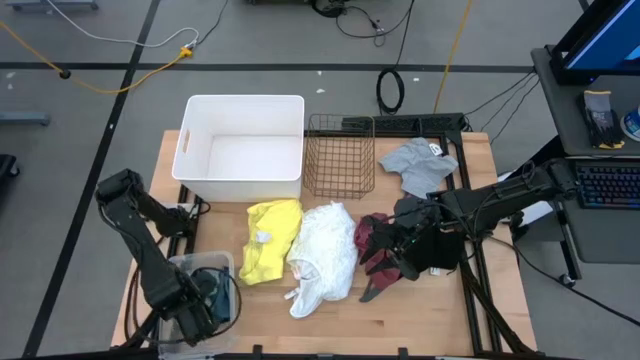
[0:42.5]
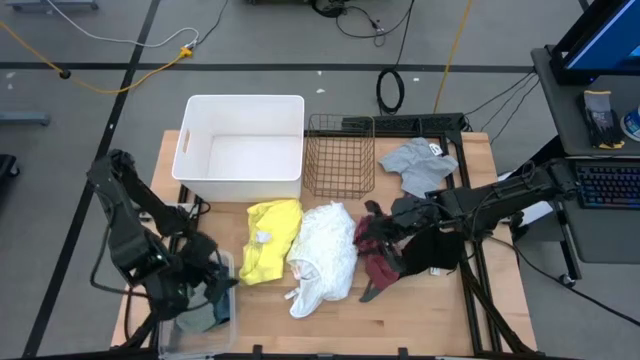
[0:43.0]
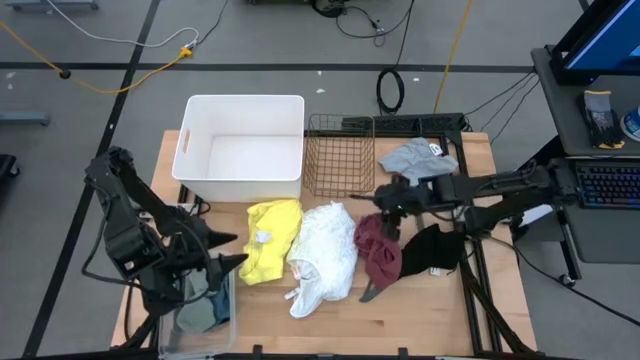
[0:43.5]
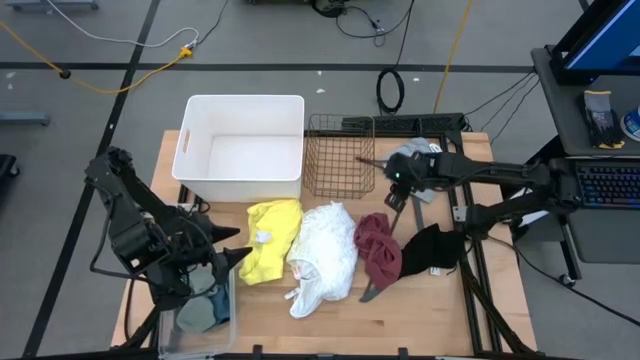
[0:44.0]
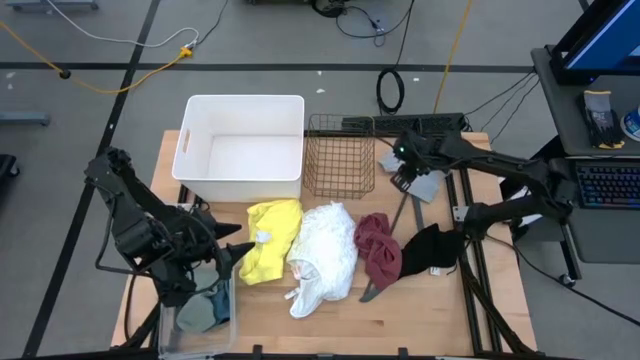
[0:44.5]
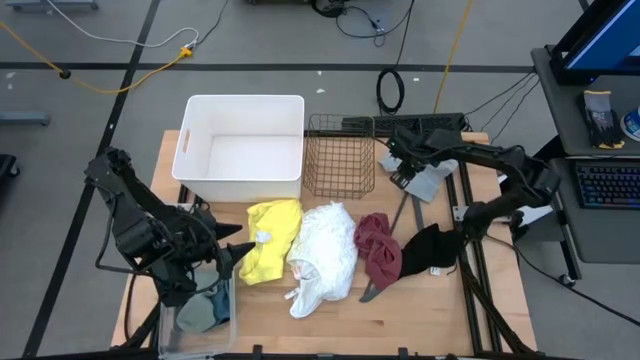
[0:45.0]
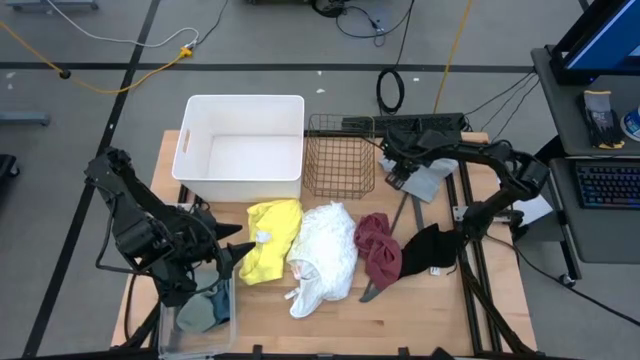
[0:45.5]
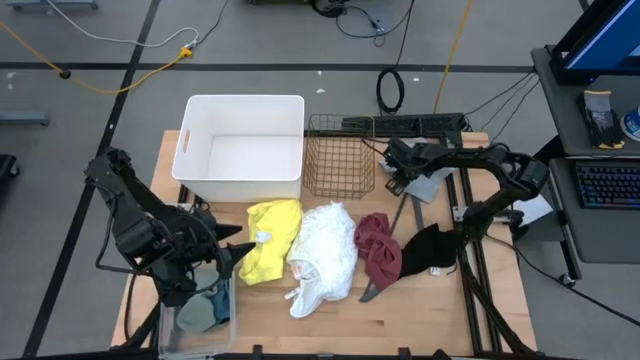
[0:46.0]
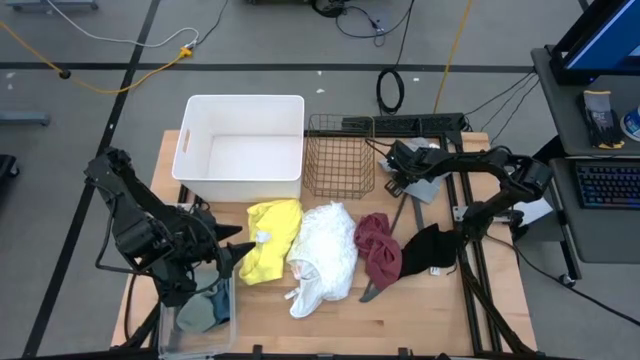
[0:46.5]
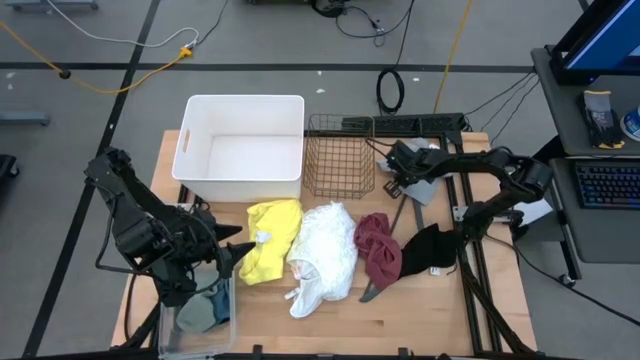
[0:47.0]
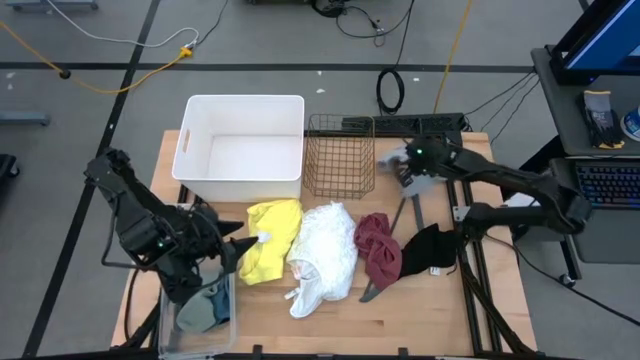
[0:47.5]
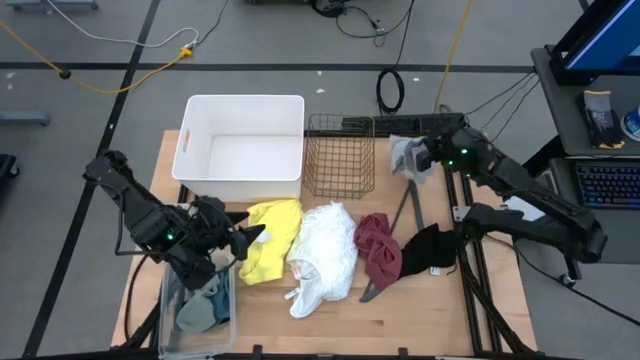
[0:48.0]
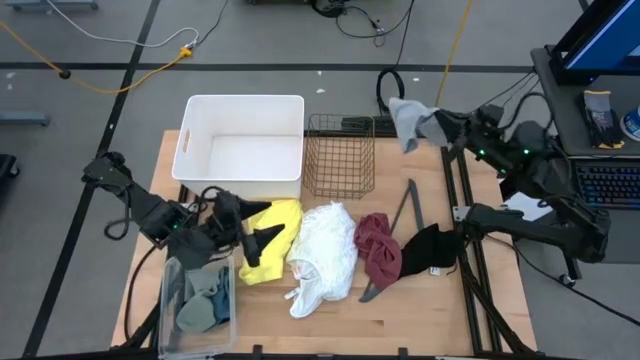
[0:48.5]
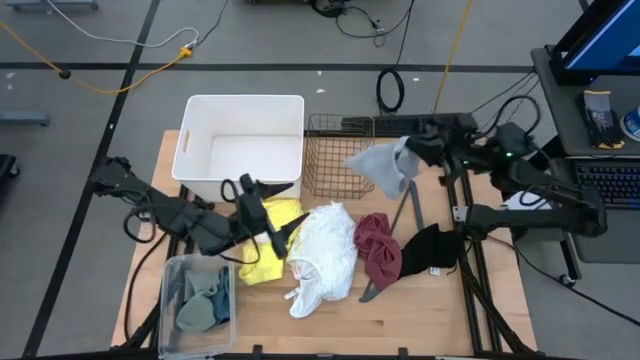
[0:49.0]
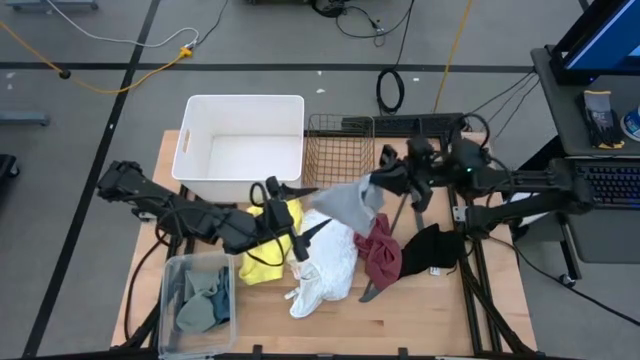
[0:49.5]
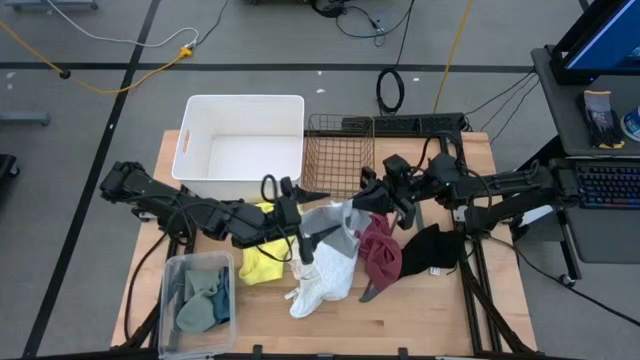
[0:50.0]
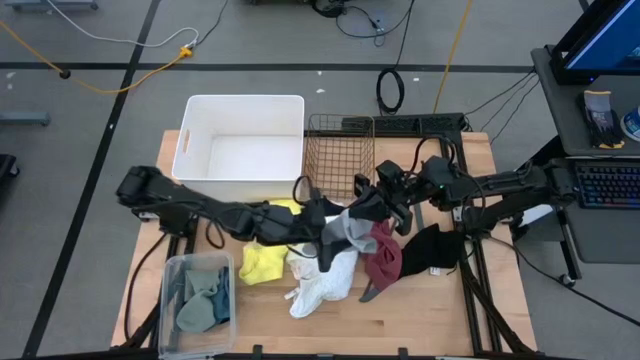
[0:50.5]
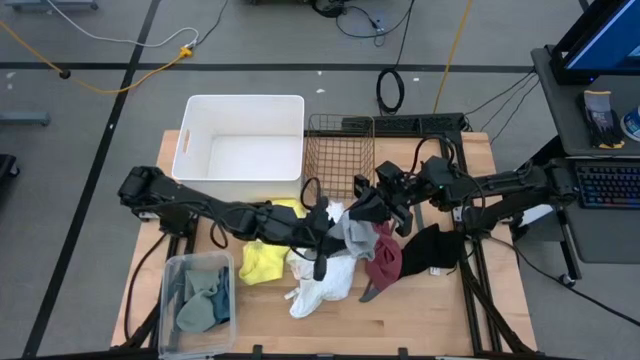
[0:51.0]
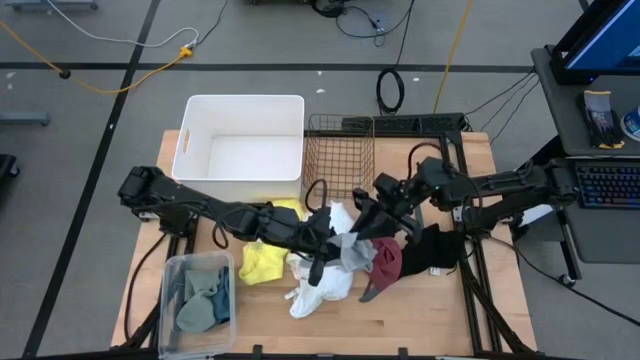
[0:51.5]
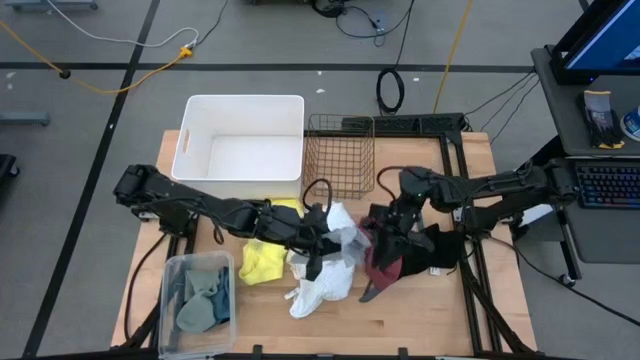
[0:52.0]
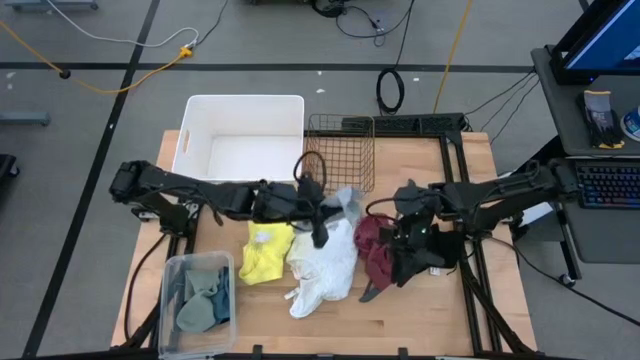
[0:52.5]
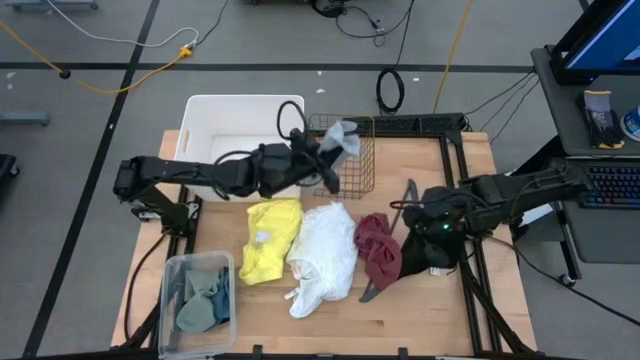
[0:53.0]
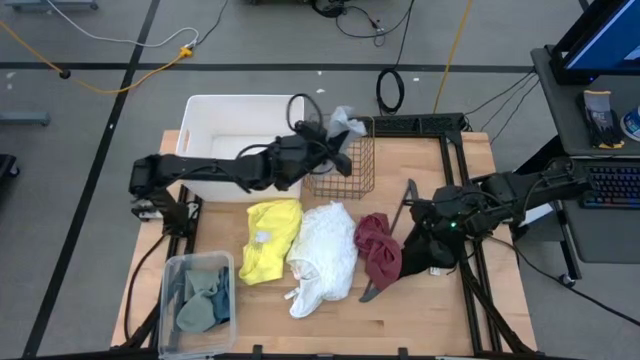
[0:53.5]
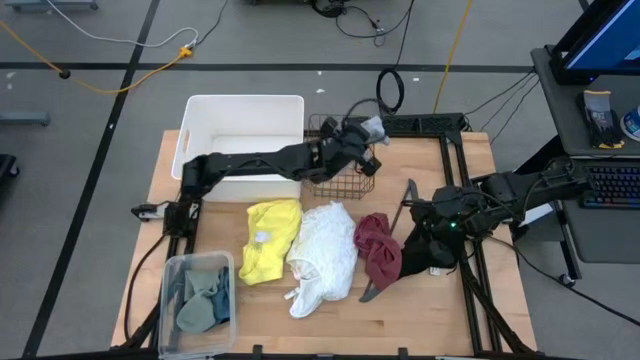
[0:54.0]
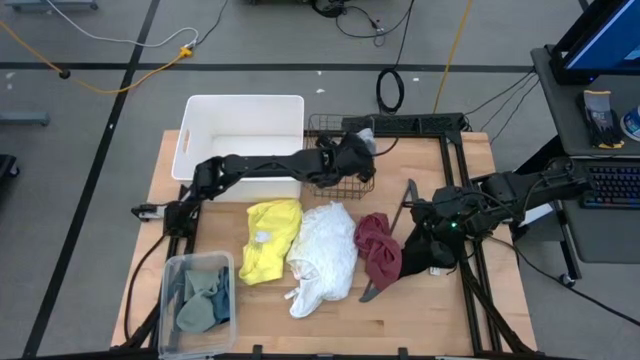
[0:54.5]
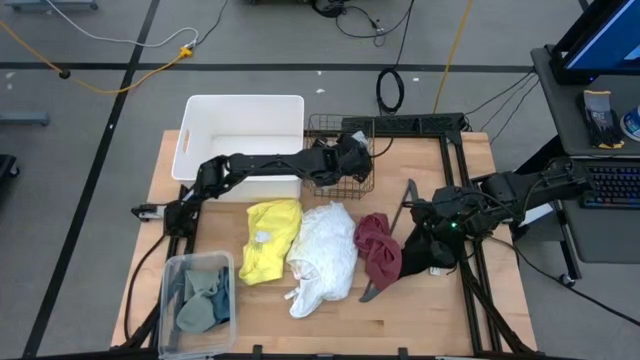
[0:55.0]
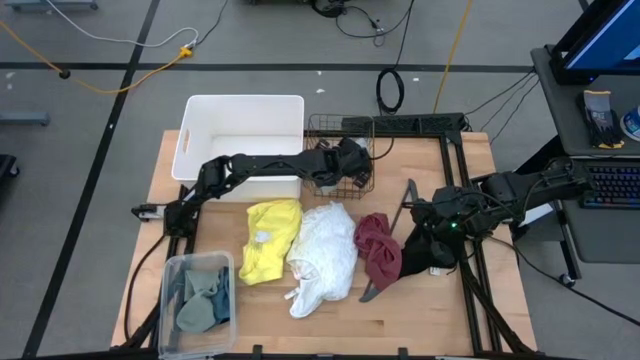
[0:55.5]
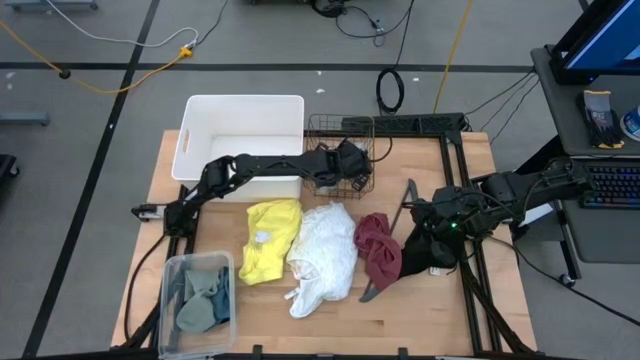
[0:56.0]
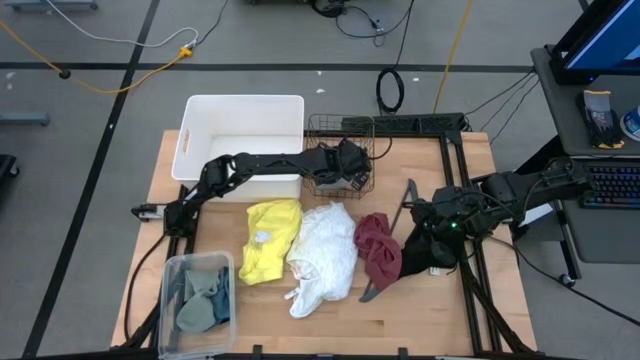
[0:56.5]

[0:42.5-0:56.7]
Task: Pick & Place Cloths
Put the gray boxers into the gold wire basket

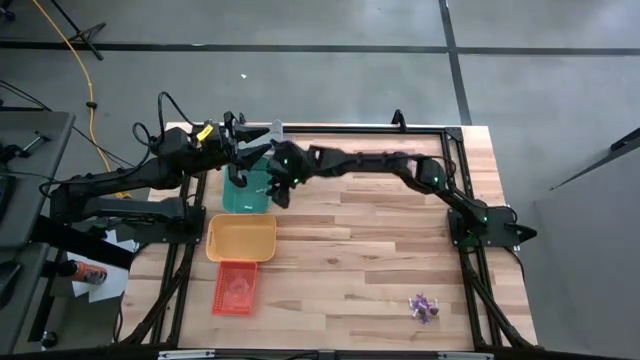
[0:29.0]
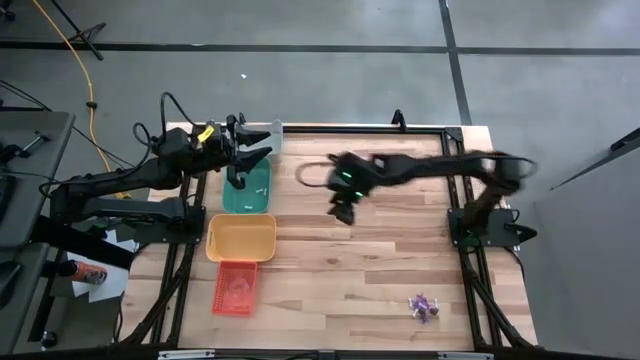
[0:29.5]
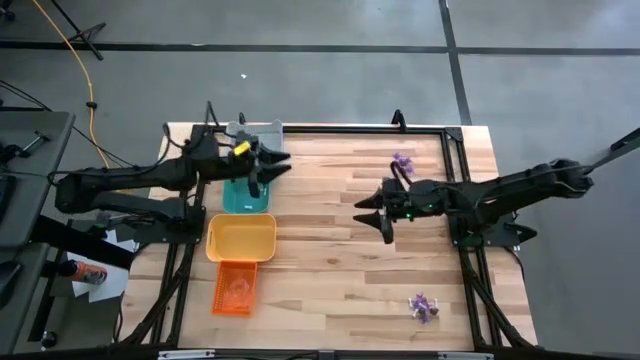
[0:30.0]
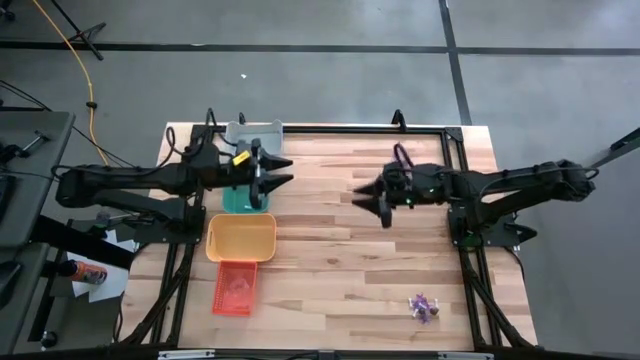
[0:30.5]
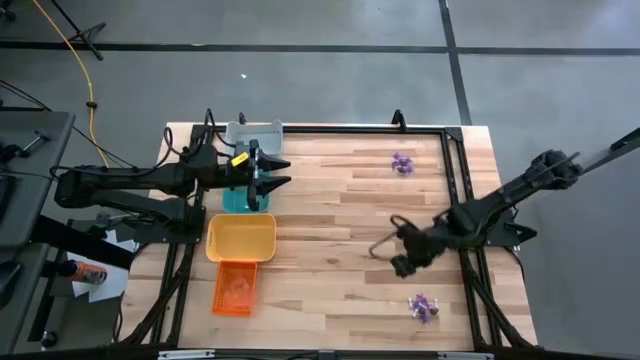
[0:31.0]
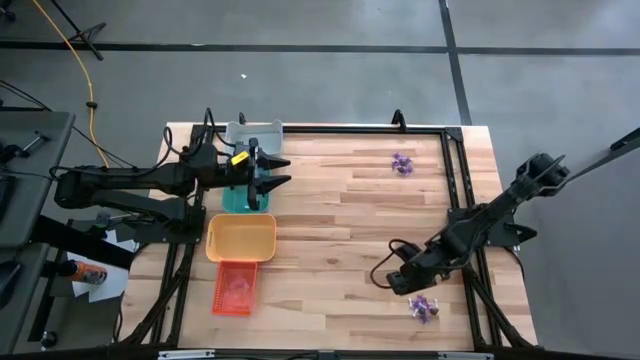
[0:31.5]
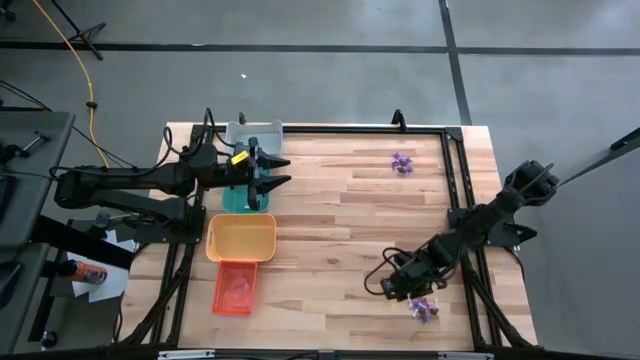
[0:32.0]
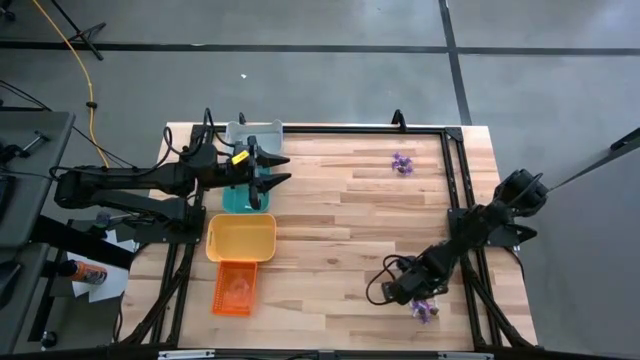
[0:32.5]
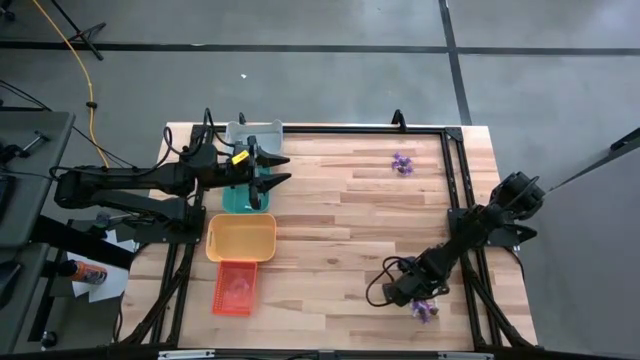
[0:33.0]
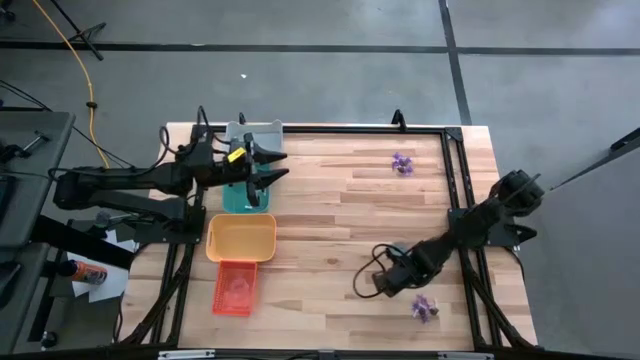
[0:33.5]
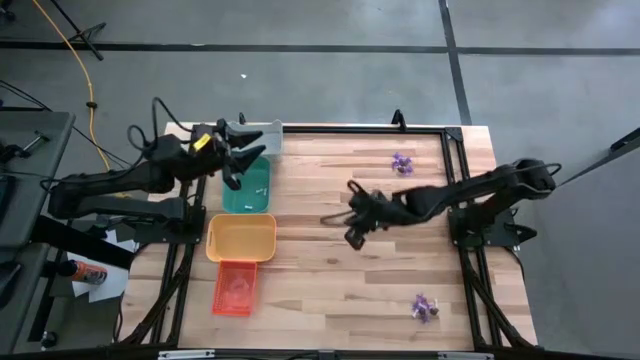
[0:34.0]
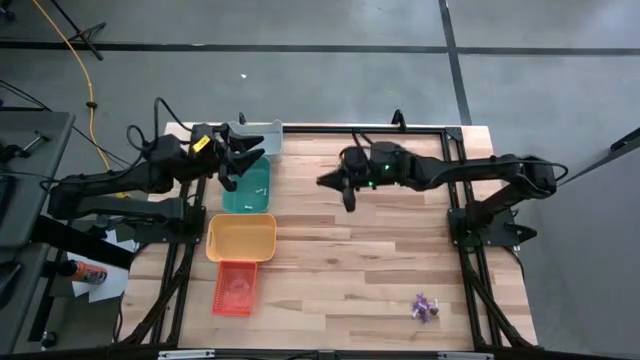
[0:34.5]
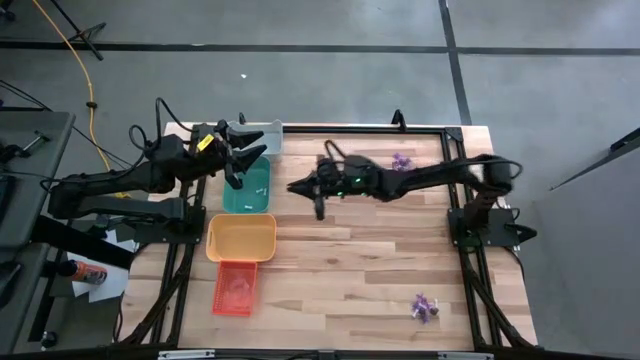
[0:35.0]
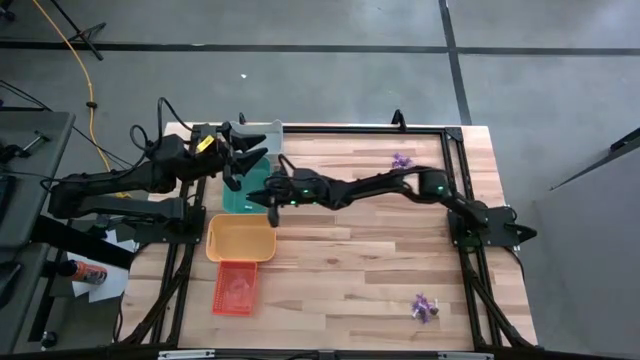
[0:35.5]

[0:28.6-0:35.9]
Task: Sort Halloween decoration
Put the white bone toy in the green bin
